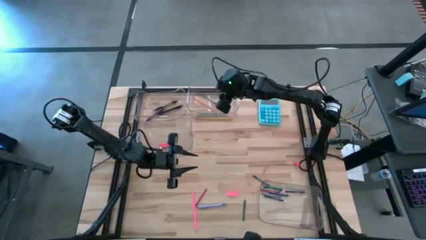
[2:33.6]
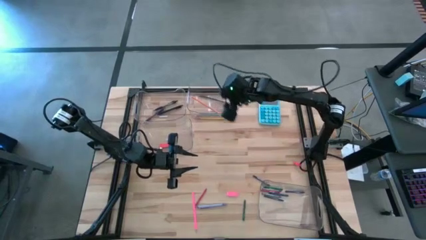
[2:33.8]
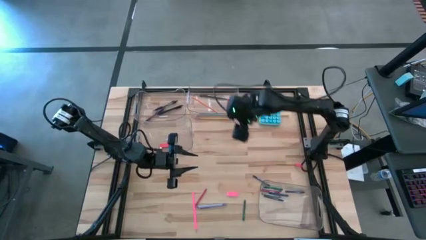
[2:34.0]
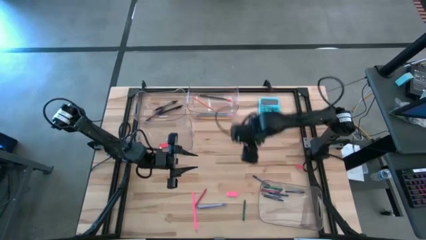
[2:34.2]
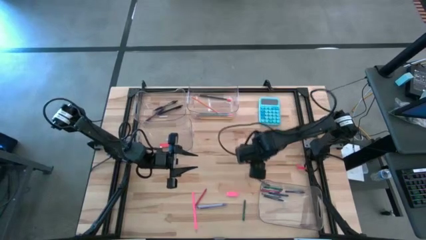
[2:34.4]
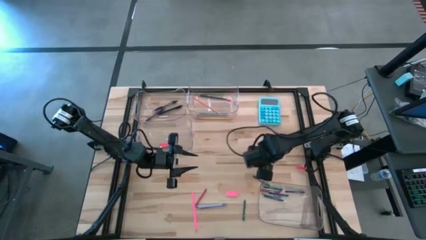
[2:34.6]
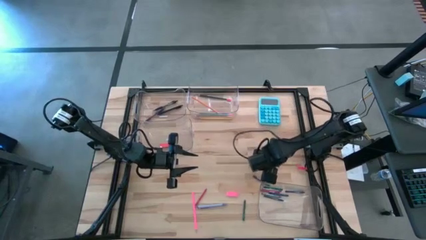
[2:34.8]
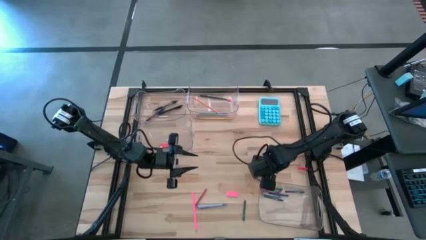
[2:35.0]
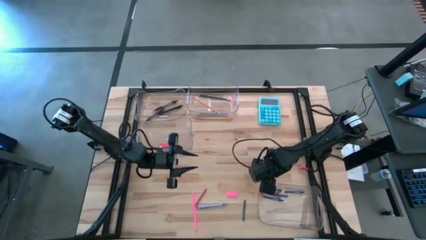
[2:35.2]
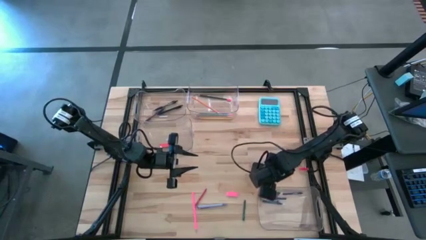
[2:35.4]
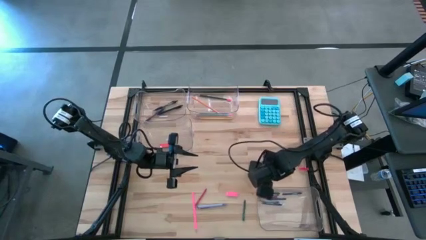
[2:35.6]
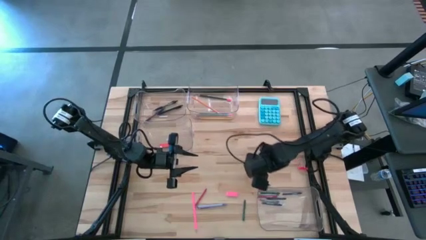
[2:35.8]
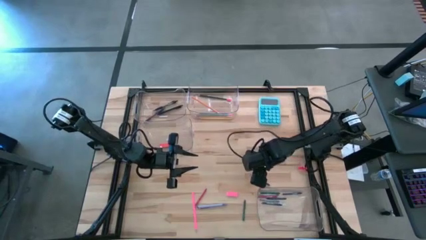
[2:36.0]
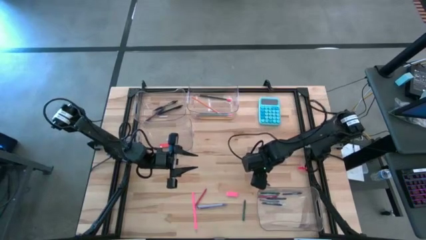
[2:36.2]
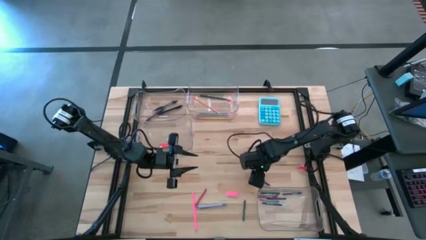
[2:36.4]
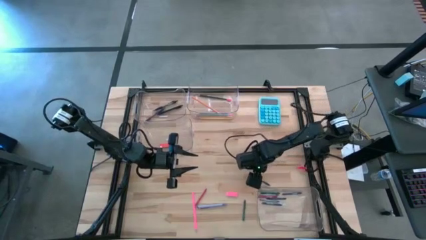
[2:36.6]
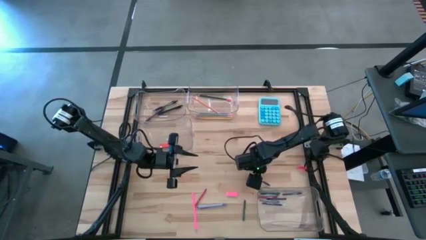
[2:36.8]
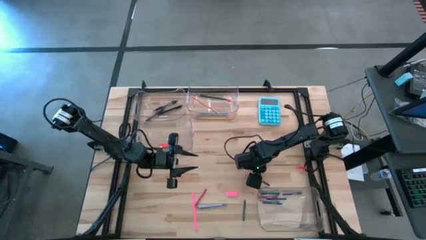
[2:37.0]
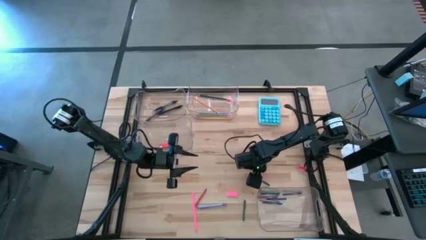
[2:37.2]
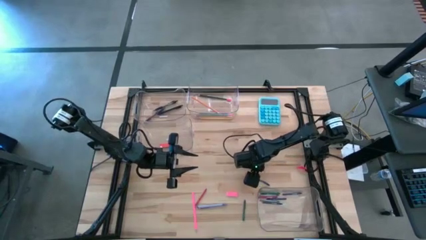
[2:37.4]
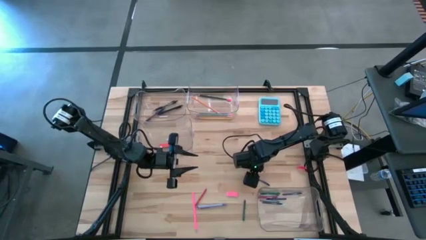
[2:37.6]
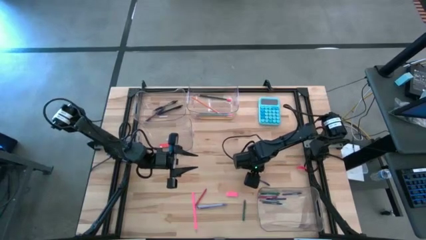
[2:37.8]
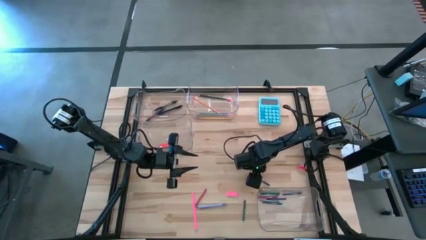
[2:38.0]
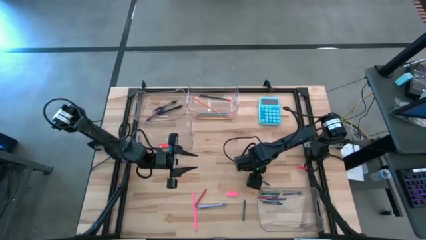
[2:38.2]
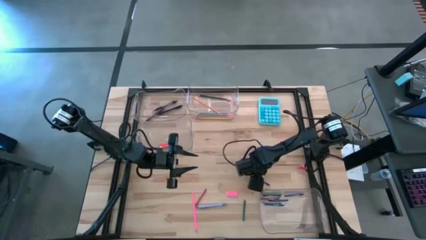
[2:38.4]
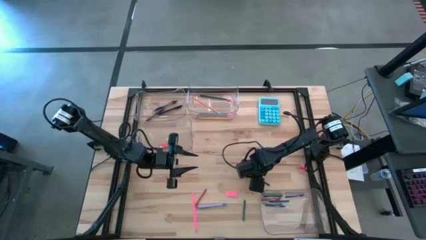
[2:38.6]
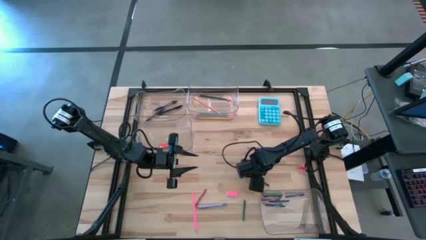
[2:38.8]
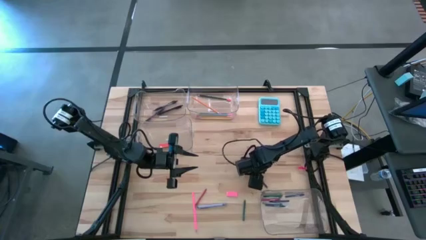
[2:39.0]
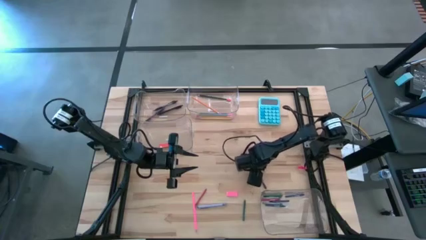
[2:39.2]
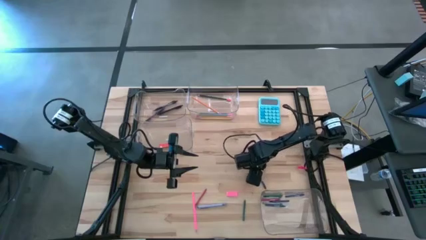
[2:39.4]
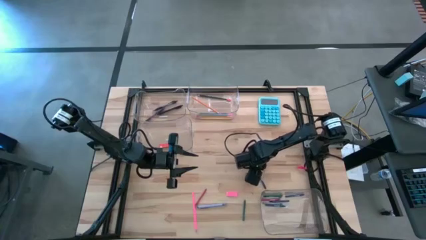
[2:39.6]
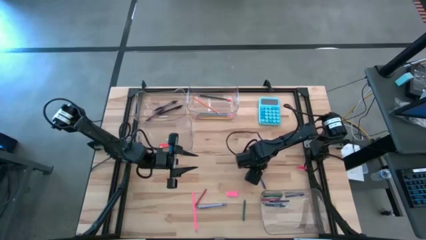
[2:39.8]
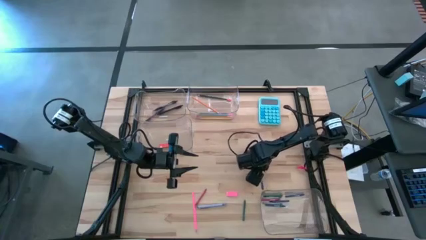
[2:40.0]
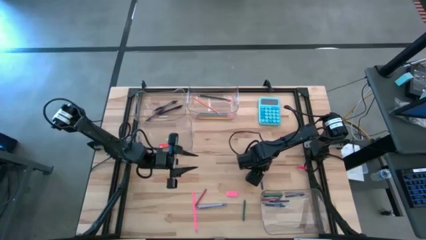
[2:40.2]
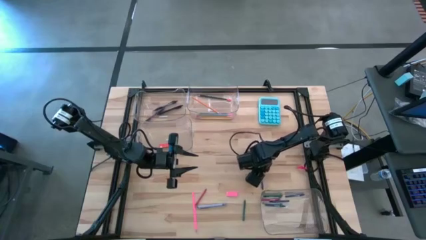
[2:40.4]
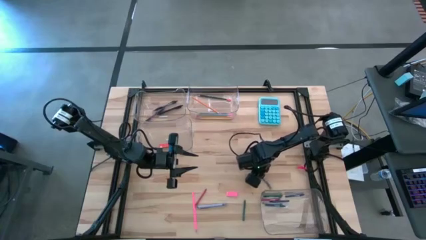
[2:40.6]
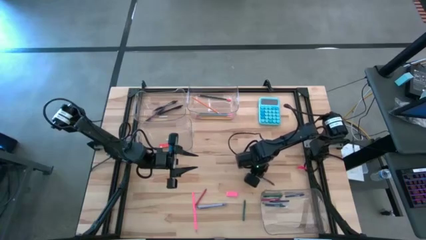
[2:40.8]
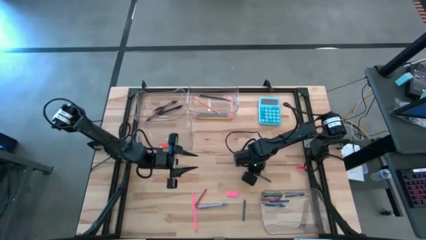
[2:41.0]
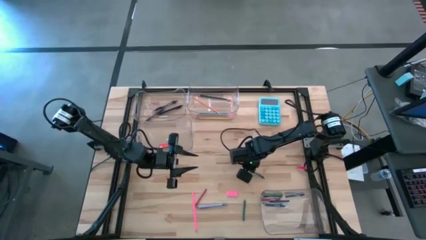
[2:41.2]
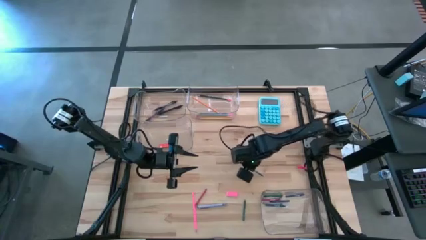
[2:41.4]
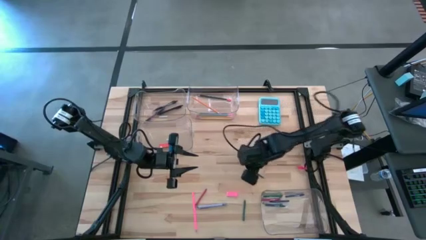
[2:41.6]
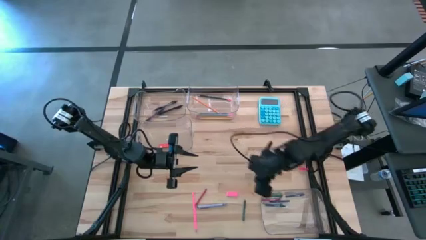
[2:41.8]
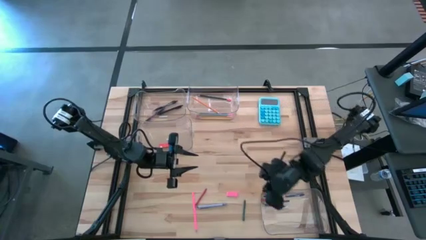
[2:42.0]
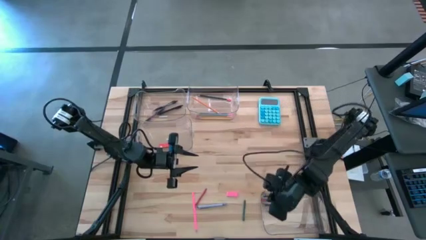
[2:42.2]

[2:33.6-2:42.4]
Task: Sort crayons/erasers/pens/pencils in bins
Put the blue crayon into the bottom right transparent bin

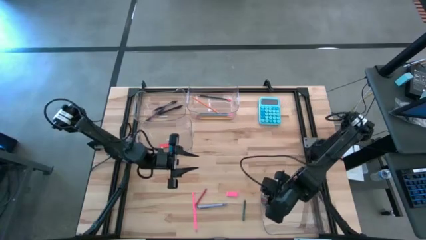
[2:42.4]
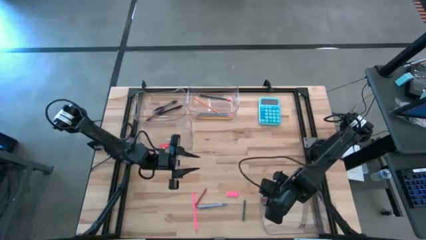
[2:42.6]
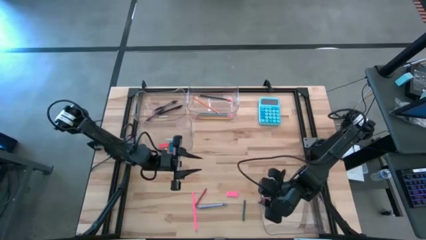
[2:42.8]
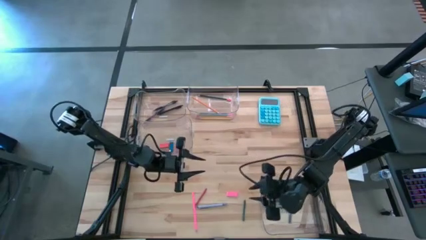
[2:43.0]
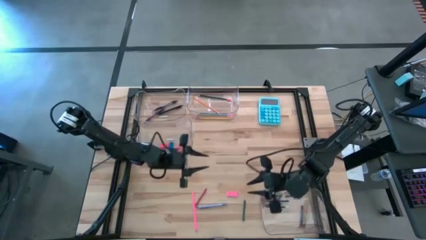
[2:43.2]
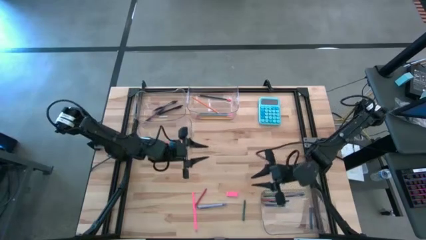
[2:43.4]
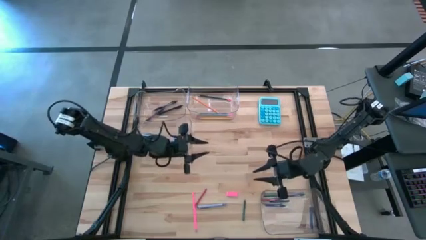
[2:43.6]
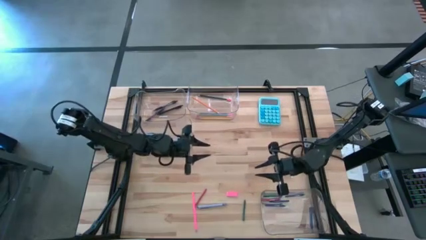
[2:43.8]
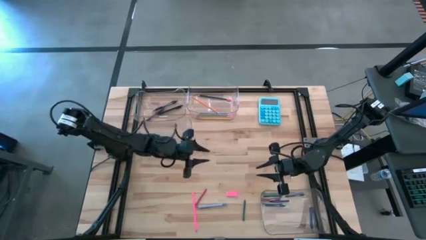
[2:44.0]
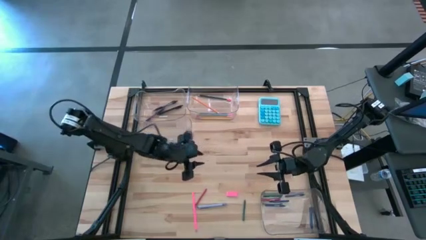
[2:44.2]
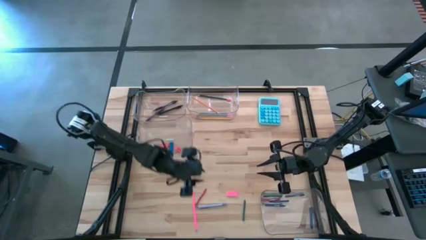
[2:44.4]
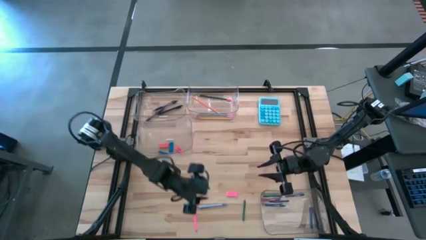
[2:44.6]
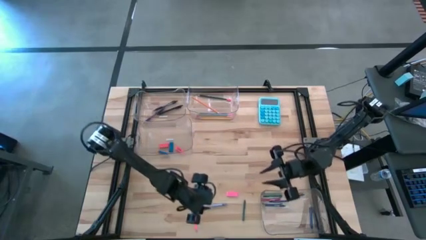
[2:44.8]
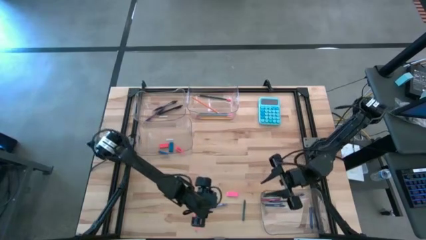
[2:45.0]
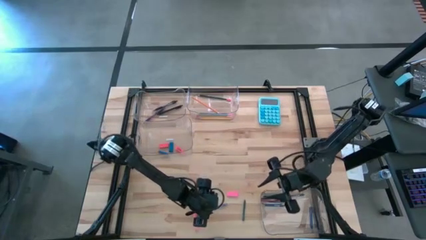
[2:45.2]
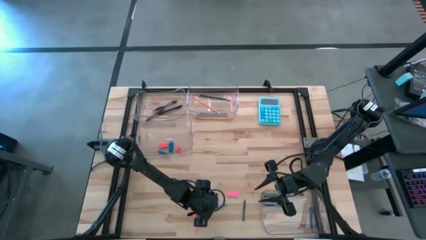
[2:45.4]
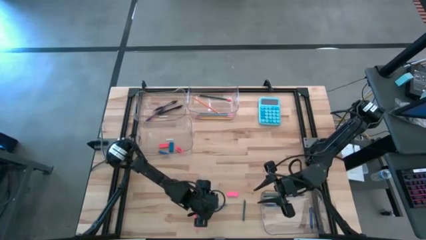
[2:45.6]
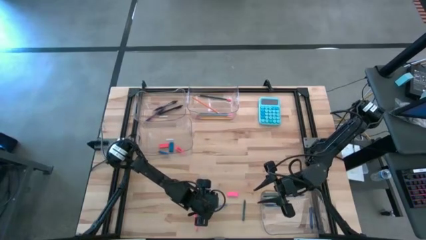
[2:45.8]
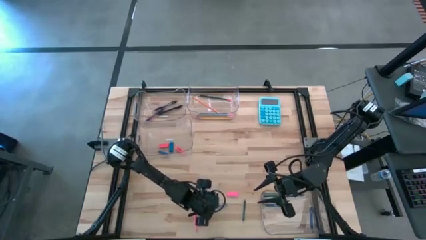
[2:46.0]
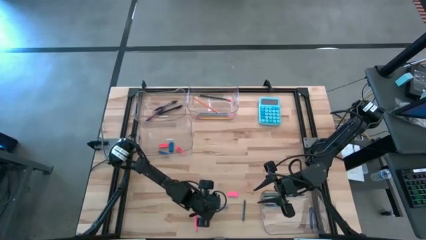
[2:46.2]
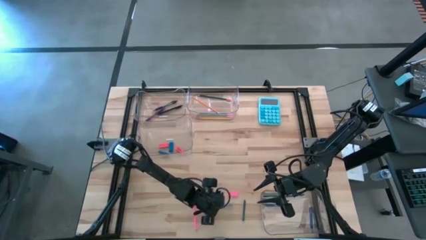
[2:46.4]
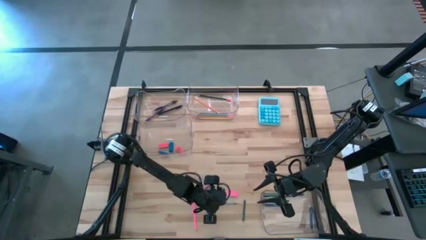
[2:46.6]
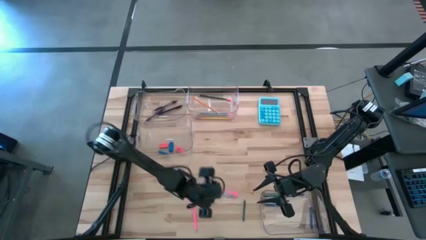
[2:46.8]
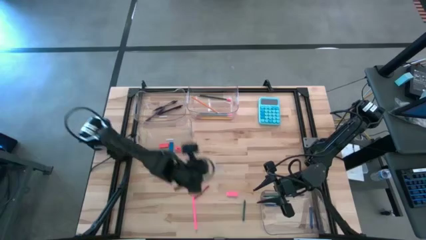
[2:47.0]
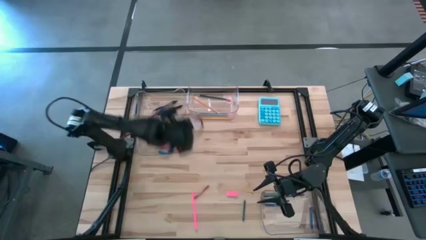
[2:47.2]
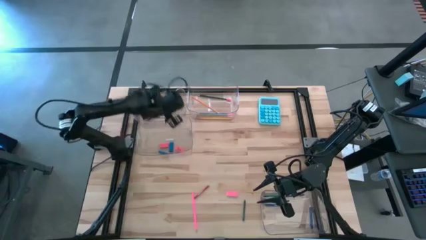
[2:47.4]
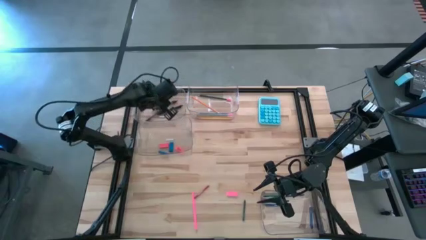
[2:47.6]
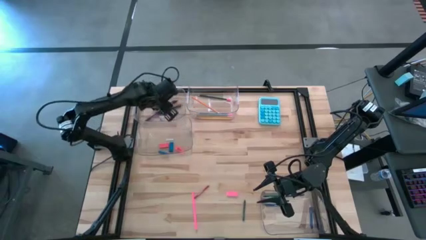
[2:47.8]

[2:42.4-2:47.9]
Put the light blue pen into the top left transparent bin
